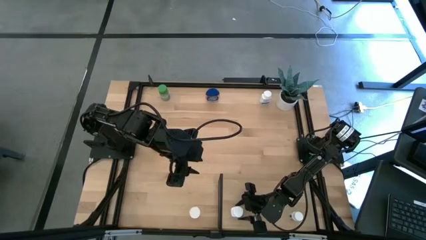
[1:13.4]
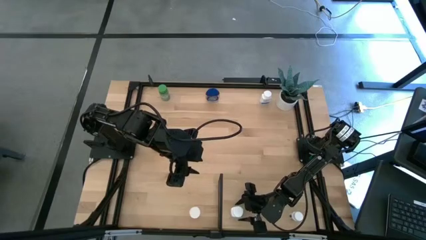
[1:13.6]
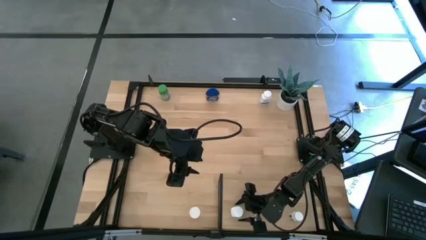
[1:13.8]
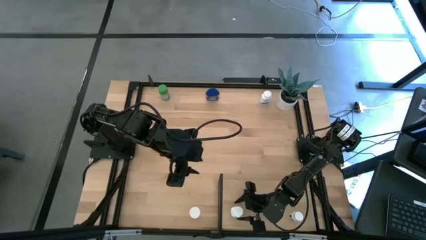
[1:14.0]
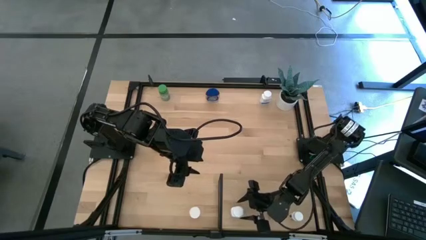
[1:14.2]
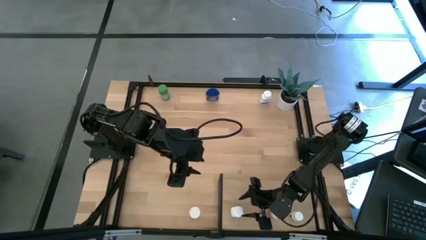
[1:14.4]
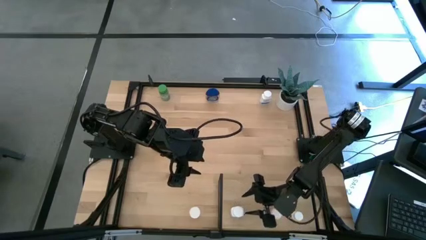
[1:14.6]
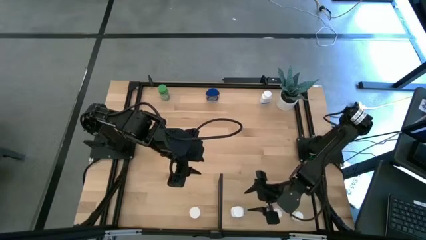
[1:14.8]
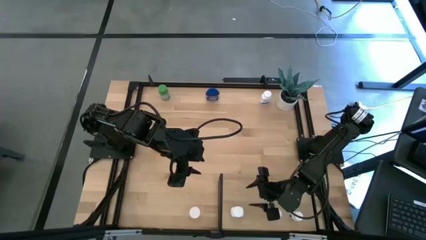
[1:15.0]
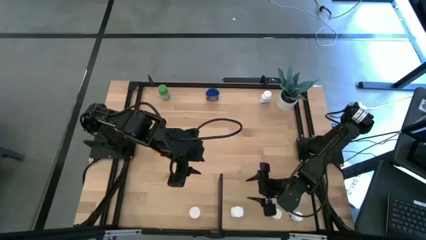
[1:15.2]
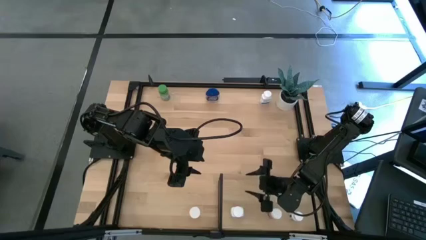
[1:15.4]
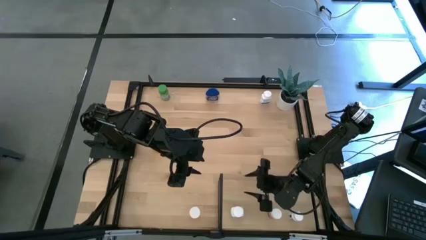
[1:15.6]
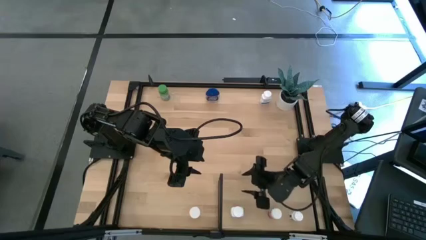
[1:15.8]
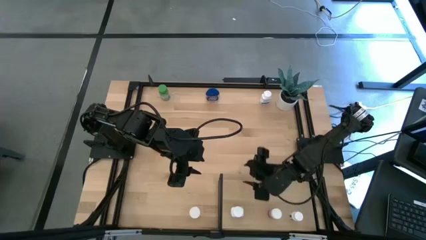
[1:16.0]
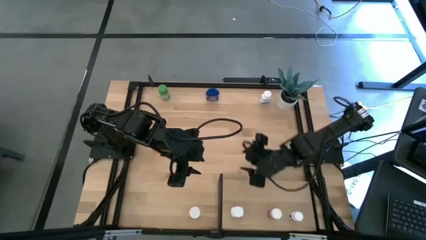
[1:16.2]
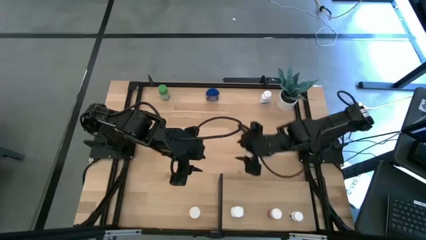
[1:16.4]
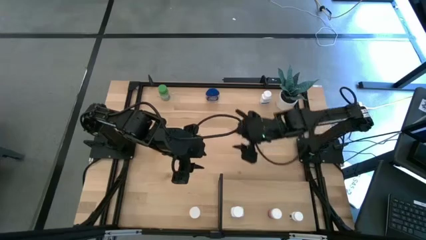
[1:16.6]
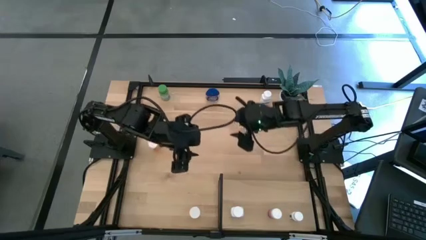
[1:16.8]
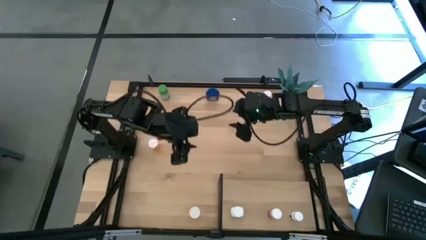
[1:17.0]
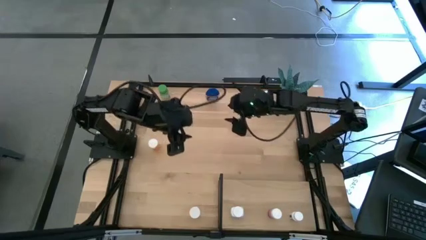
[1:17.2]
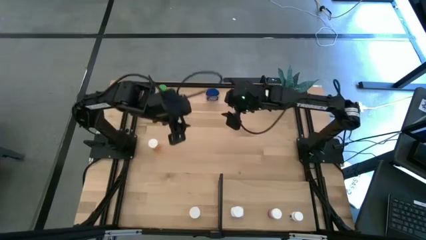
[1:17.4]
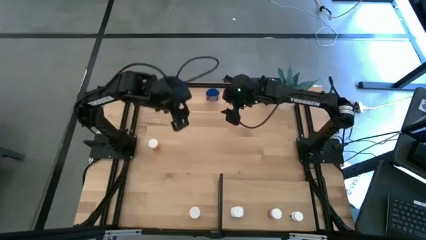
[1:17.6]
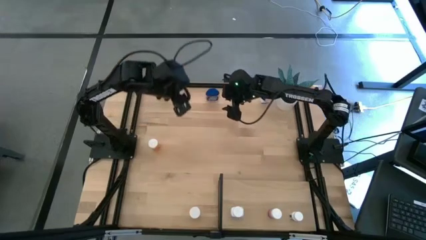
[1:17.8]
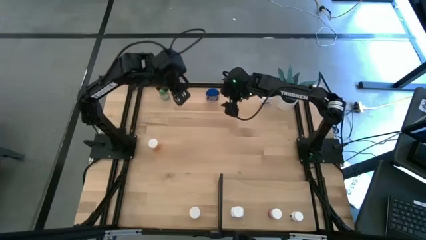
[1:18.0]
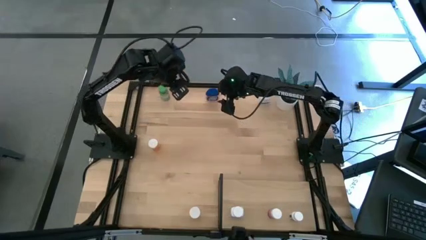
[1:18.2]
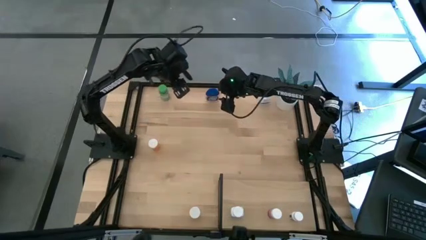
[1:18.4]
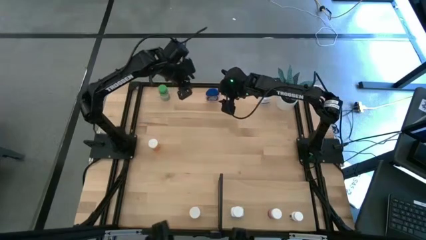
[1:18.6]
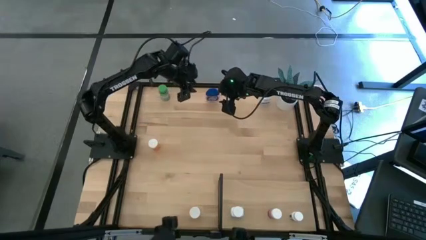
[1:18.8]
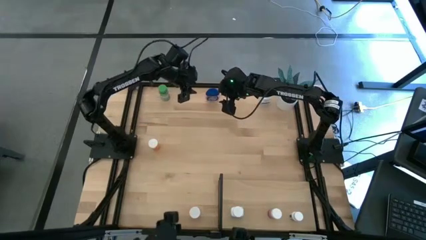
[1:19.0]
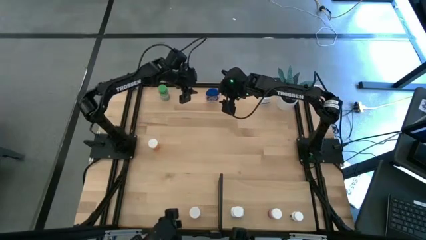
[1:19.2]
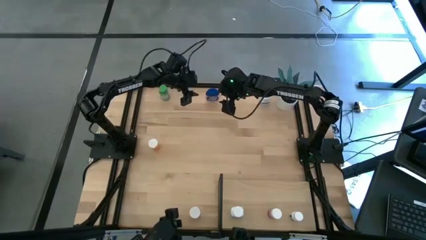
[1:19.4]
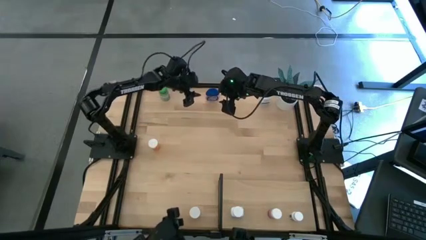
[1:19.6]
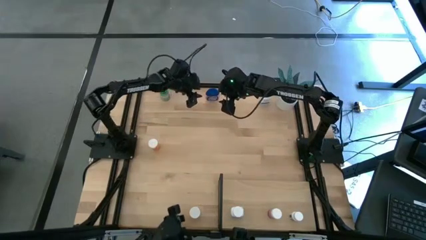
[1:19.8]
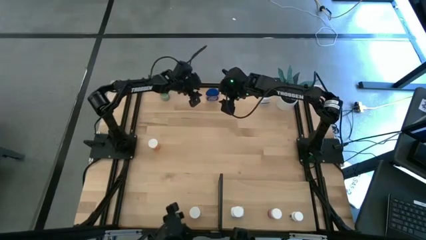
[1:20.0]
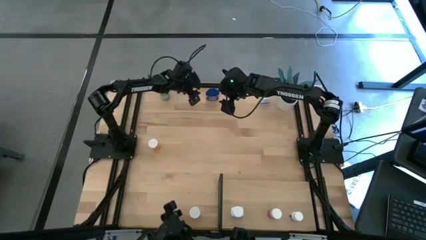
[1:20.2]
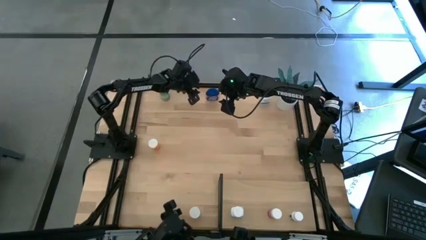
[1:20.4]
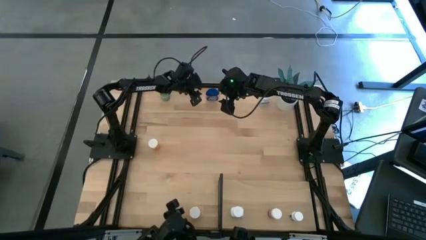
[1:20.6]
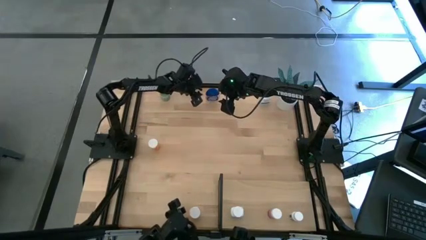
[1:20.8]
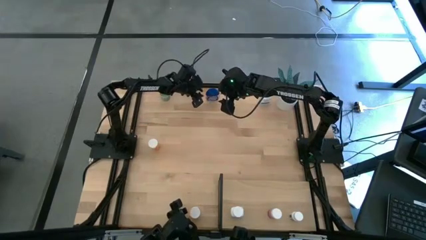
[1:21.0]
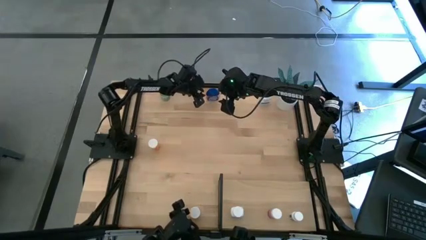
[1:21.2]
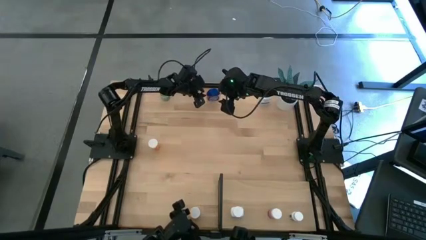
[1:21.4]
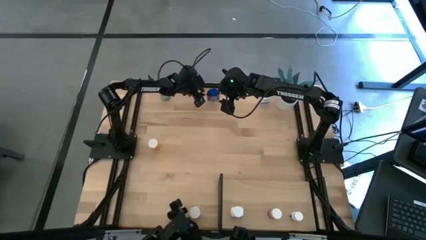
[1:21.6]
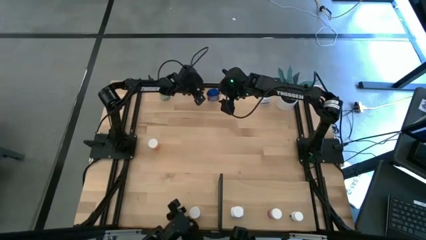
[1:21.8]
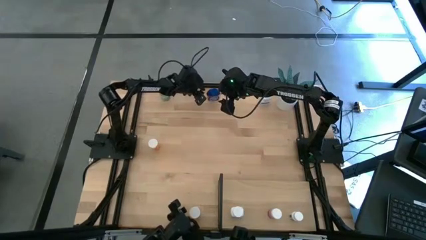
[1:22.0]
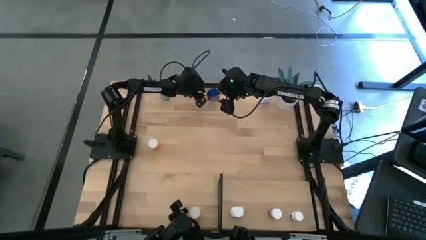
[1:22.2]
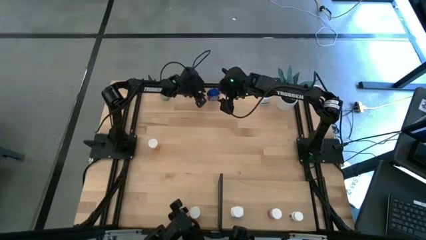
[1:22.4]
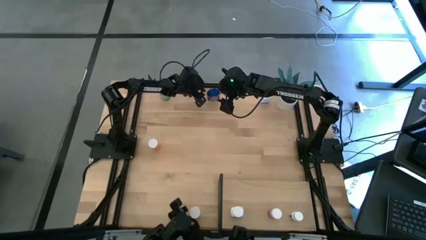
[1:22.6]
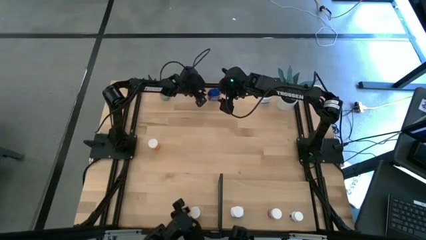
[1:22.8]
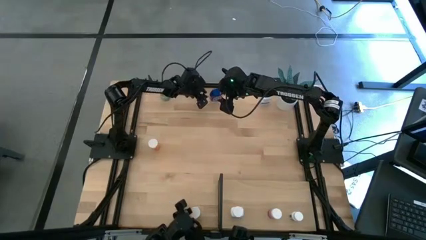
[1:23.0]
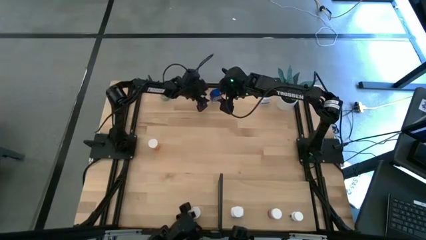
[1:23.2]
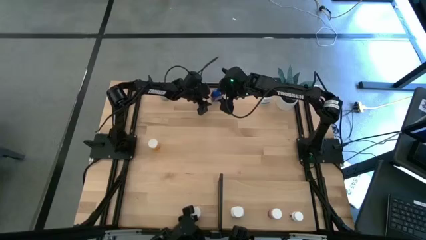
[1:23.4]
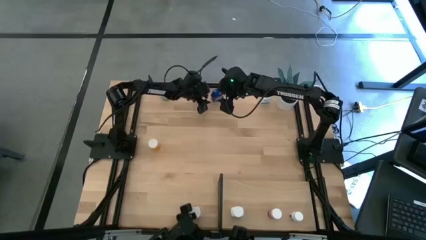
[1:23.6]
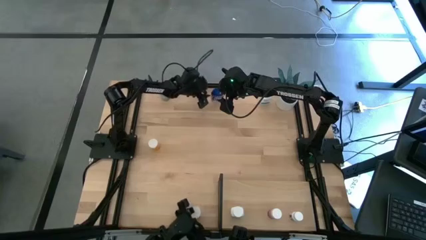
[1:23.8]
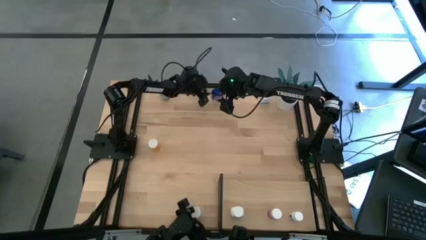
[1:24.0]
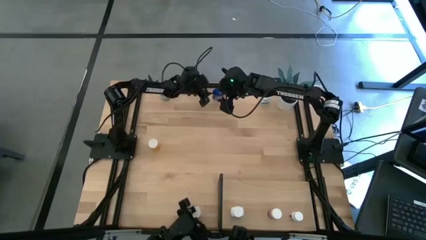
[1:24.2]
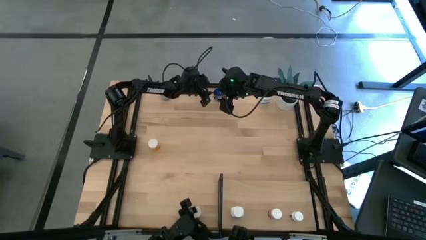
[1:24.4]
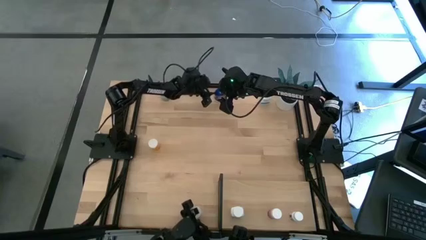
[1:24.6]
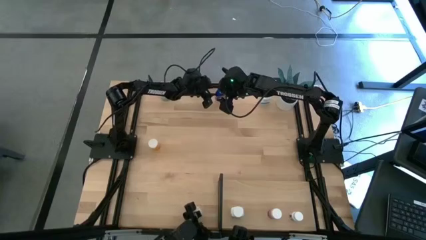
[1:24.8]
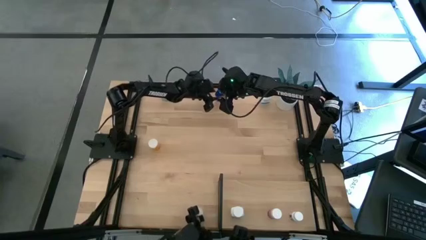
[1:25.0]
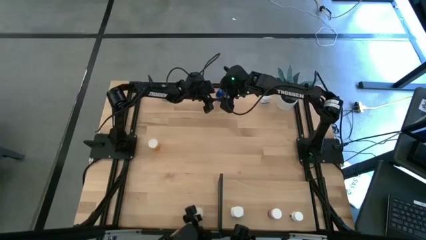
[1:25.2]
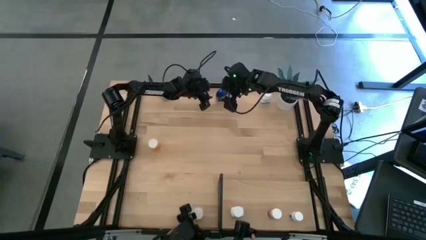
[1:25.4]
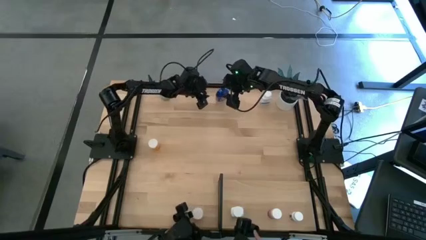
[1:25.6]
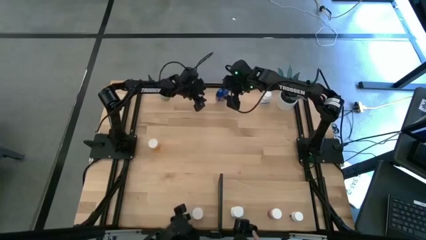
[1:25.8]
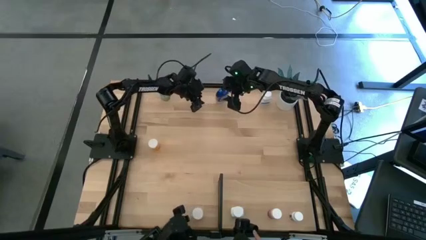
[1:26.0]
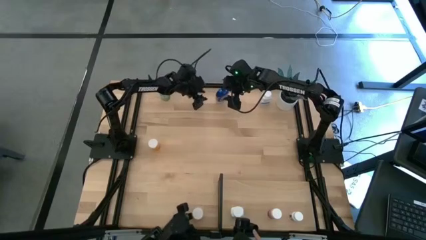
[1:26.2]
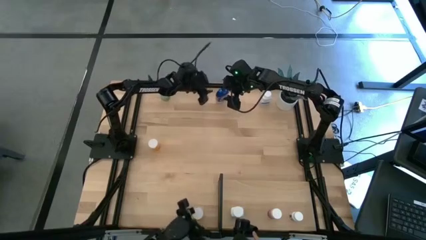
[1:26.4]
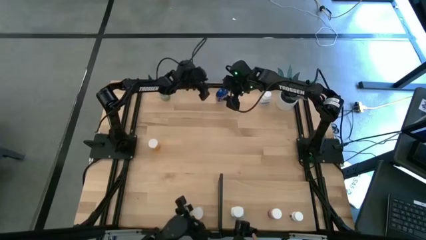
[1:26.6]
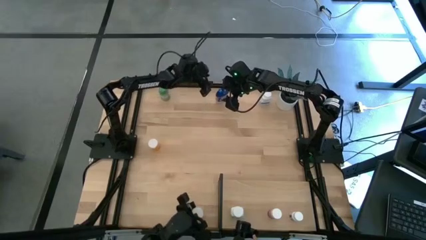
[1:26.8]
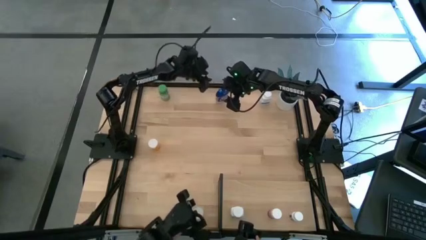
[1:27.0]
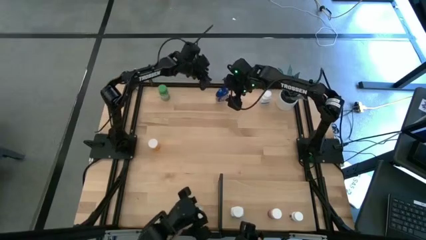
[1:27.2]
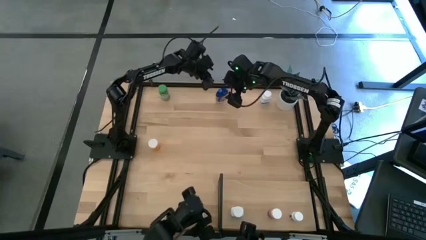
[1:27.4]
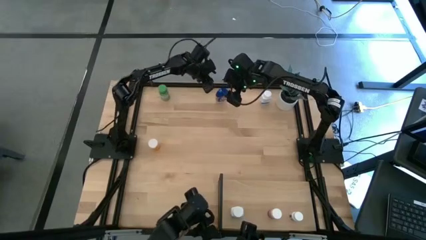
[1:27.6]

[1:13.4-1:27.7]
Task: Pick and place medicine bottles onto shelf by color
Put the blue pill bottle onto the shelf
